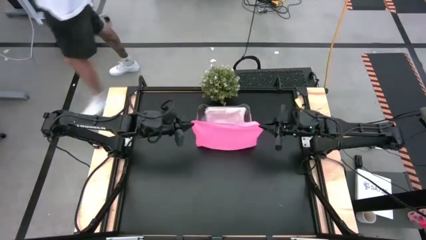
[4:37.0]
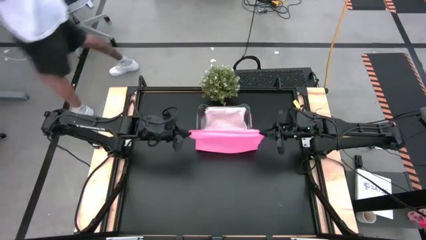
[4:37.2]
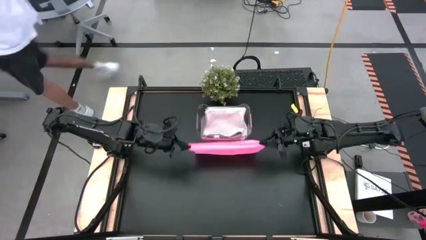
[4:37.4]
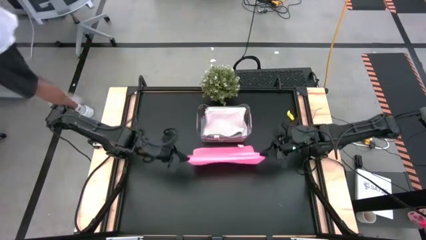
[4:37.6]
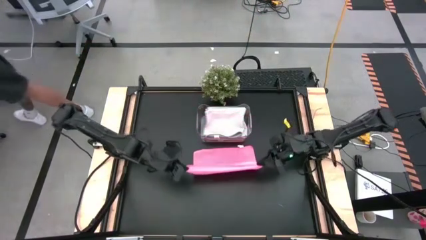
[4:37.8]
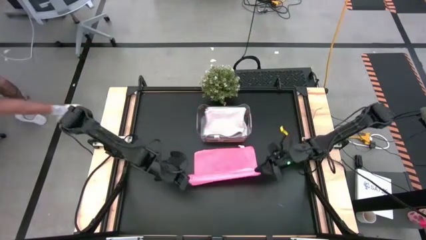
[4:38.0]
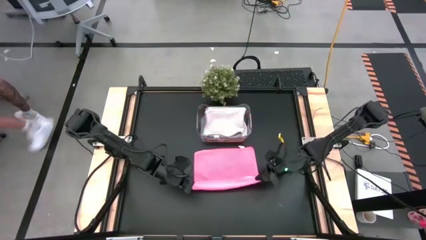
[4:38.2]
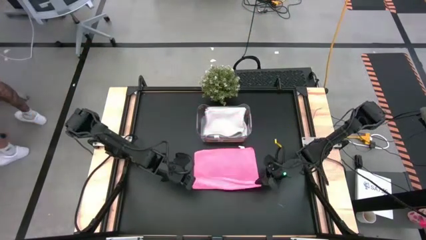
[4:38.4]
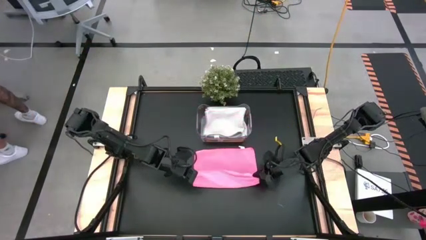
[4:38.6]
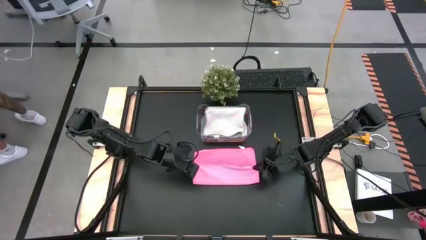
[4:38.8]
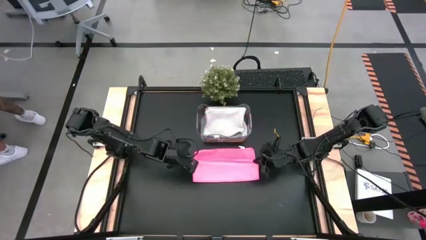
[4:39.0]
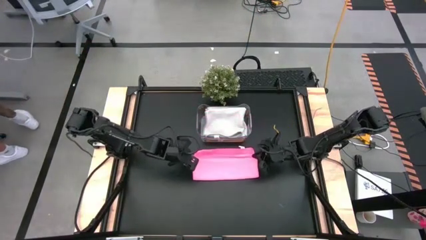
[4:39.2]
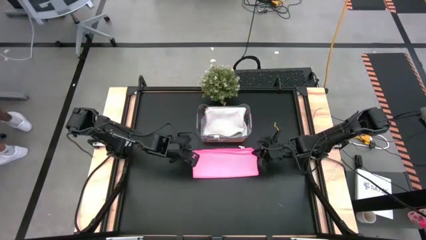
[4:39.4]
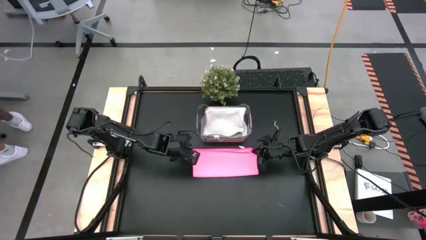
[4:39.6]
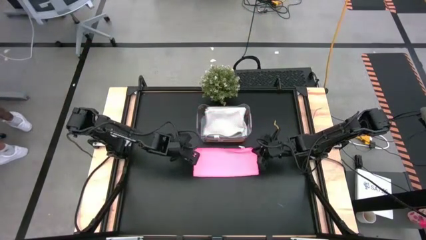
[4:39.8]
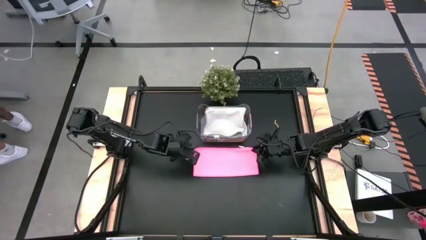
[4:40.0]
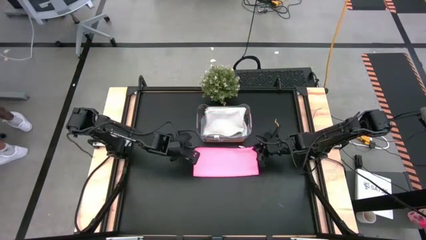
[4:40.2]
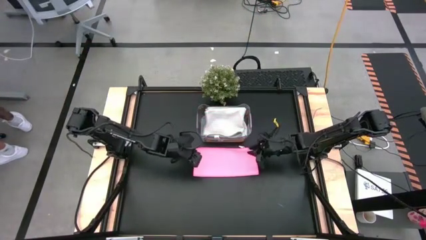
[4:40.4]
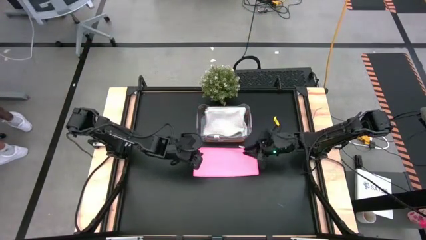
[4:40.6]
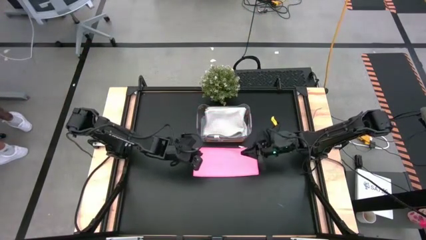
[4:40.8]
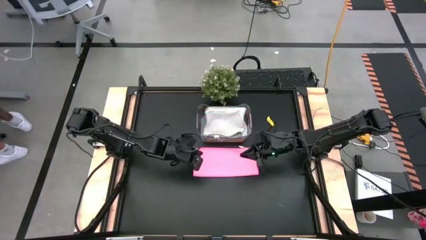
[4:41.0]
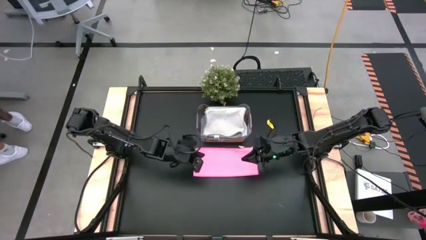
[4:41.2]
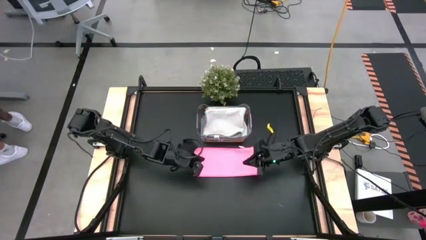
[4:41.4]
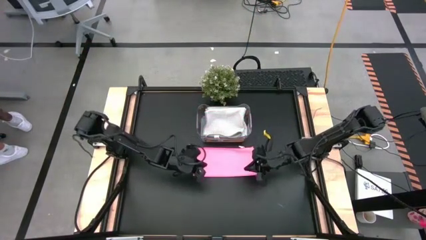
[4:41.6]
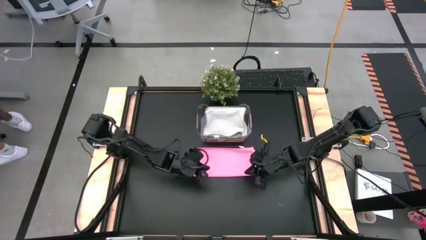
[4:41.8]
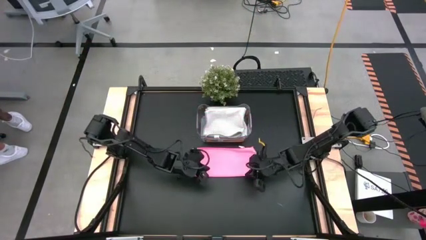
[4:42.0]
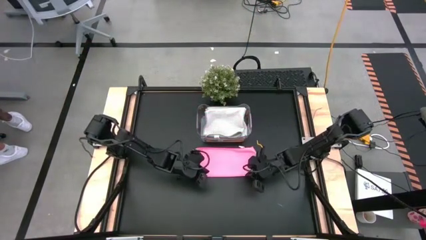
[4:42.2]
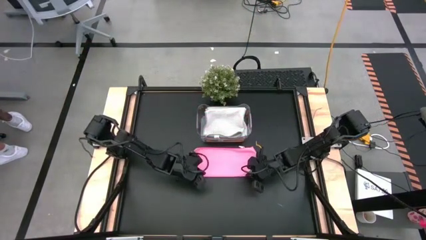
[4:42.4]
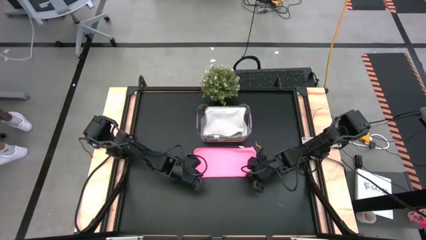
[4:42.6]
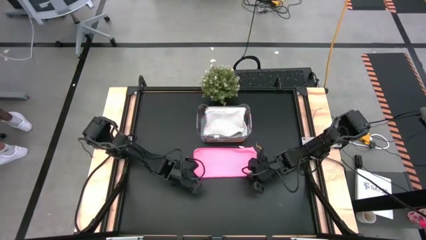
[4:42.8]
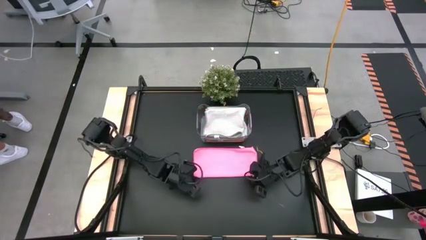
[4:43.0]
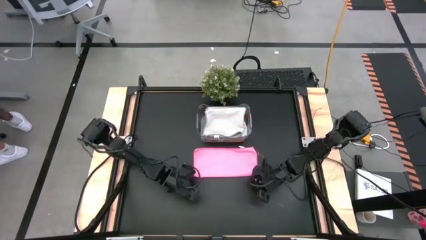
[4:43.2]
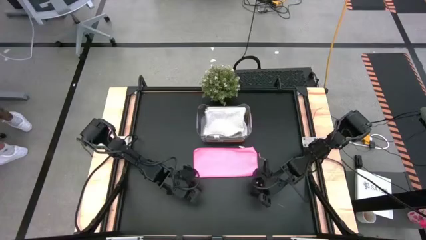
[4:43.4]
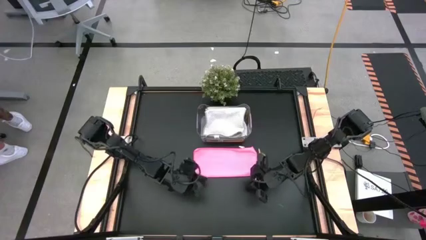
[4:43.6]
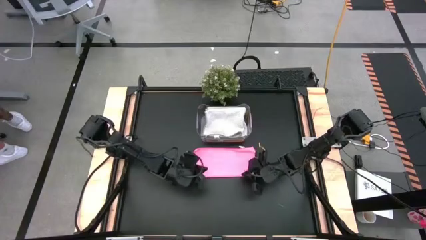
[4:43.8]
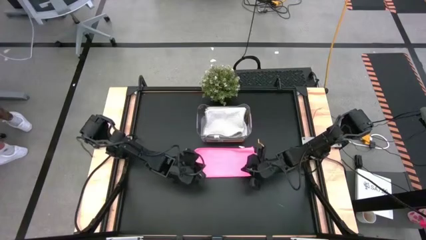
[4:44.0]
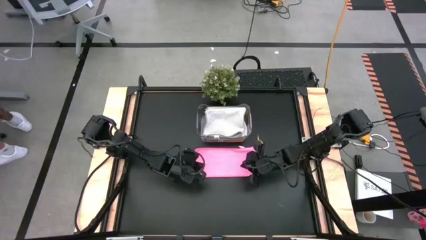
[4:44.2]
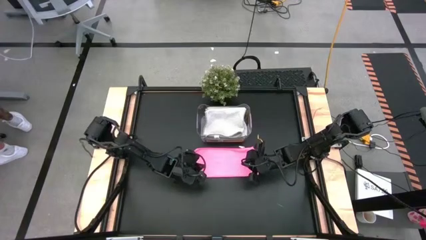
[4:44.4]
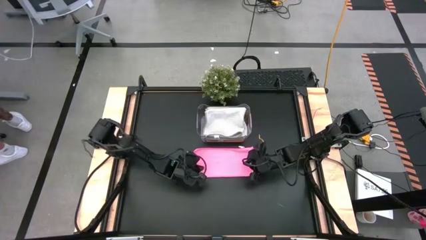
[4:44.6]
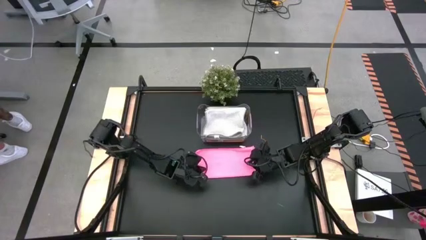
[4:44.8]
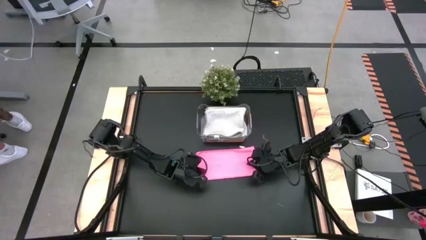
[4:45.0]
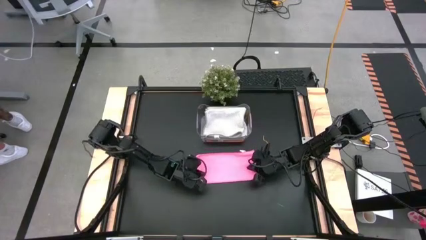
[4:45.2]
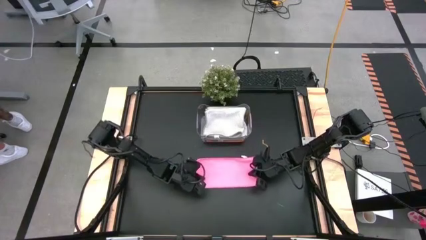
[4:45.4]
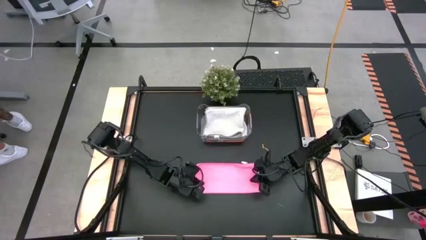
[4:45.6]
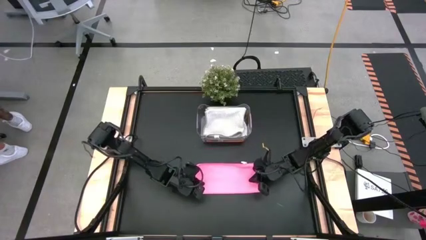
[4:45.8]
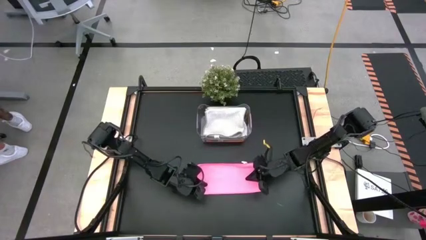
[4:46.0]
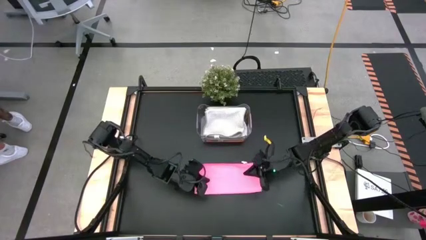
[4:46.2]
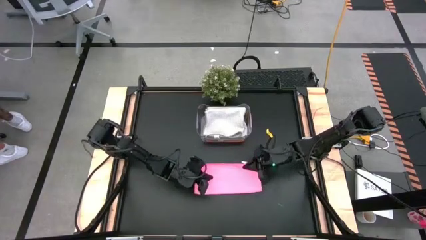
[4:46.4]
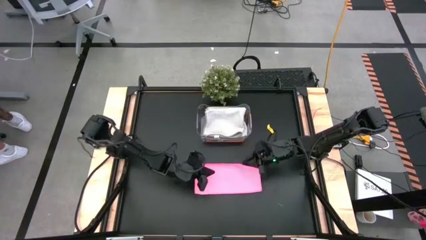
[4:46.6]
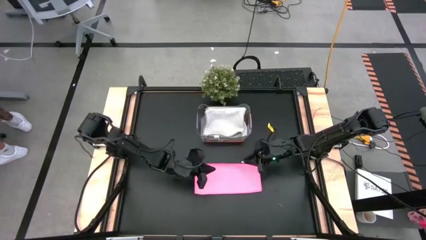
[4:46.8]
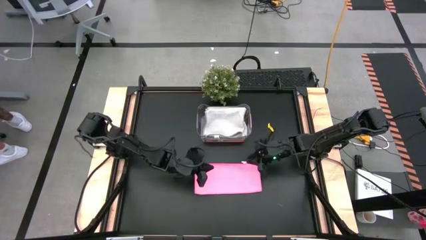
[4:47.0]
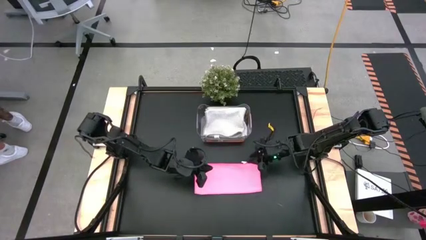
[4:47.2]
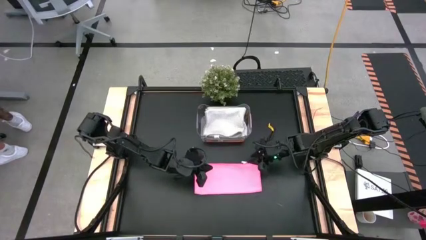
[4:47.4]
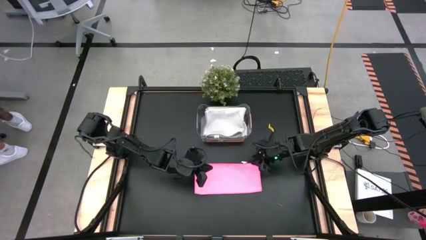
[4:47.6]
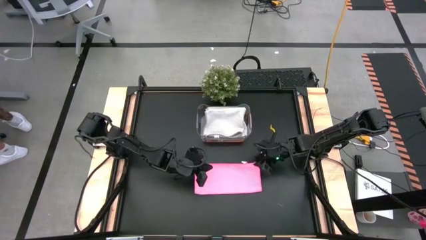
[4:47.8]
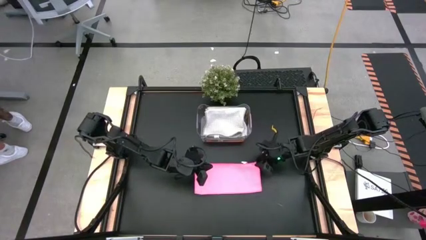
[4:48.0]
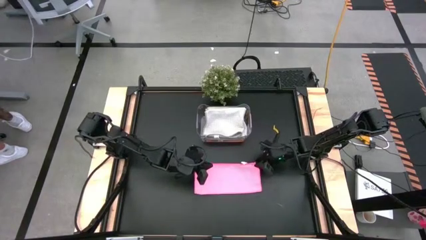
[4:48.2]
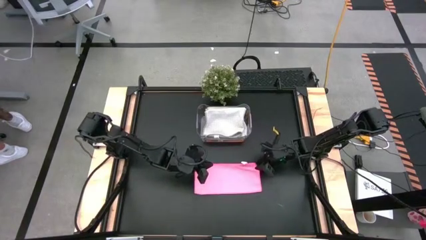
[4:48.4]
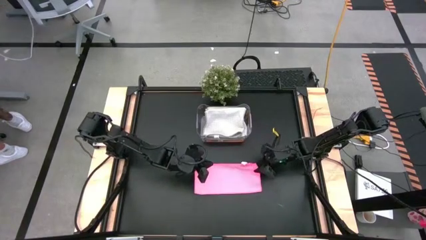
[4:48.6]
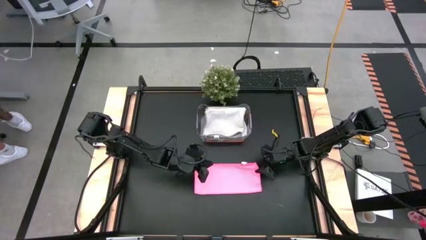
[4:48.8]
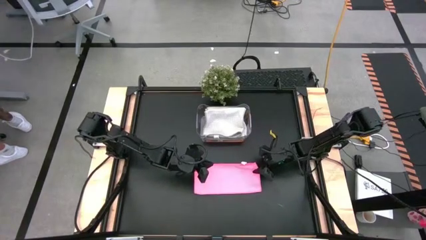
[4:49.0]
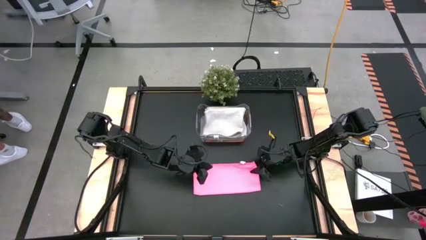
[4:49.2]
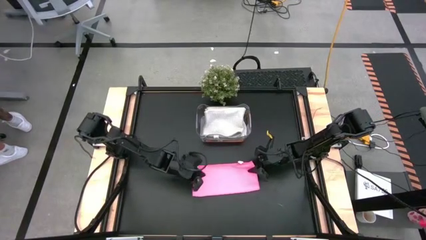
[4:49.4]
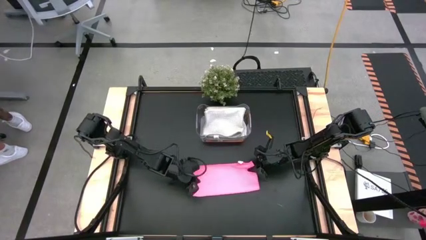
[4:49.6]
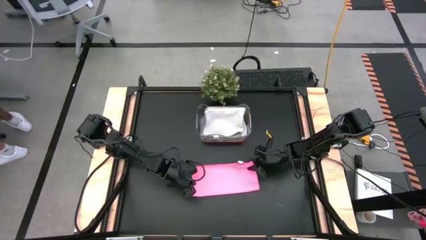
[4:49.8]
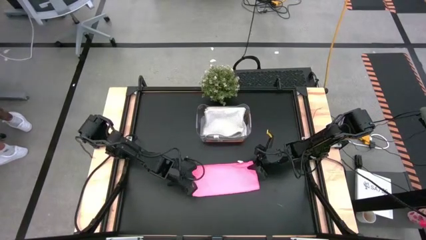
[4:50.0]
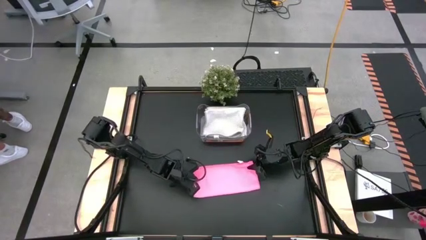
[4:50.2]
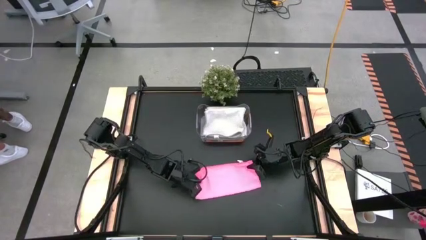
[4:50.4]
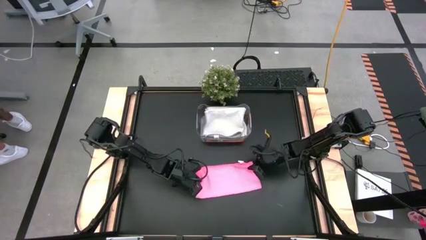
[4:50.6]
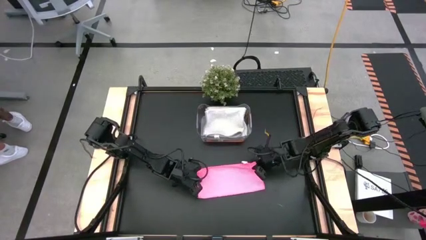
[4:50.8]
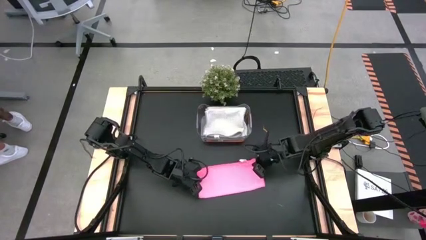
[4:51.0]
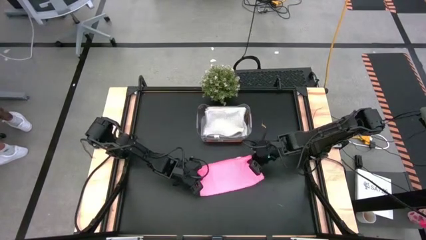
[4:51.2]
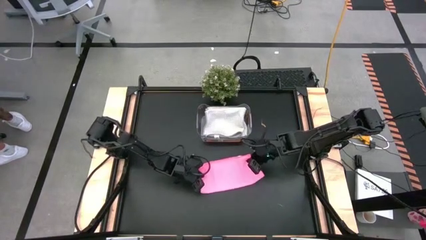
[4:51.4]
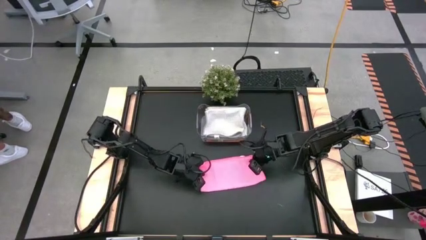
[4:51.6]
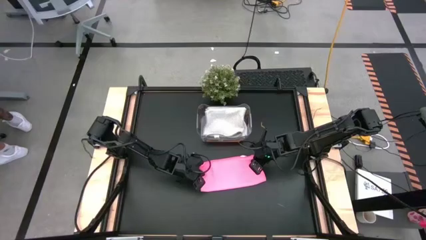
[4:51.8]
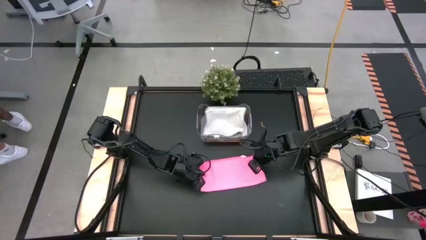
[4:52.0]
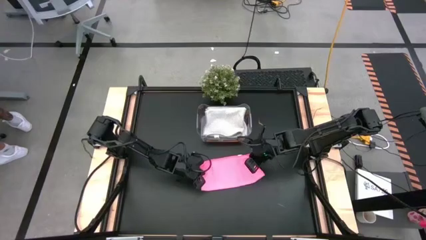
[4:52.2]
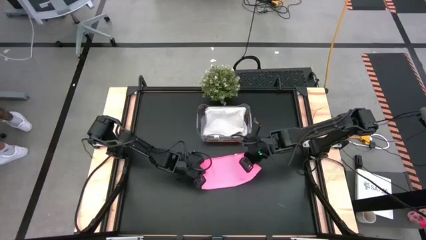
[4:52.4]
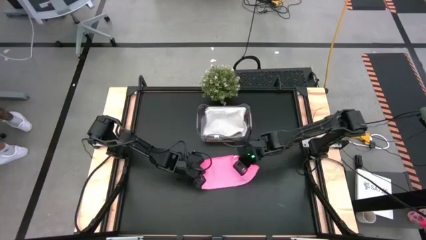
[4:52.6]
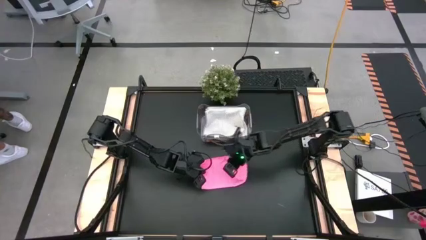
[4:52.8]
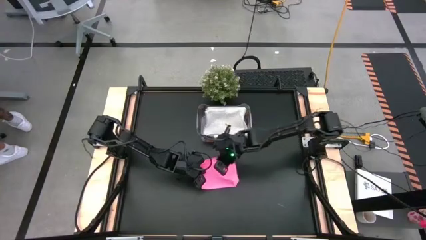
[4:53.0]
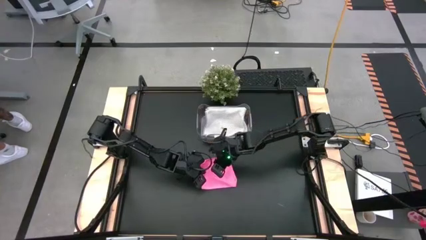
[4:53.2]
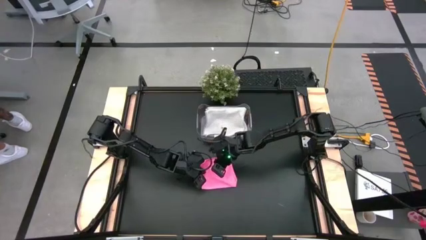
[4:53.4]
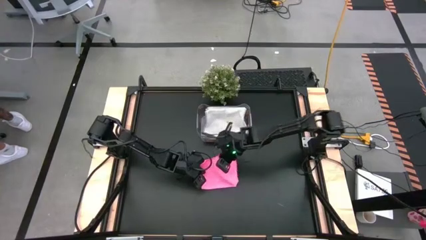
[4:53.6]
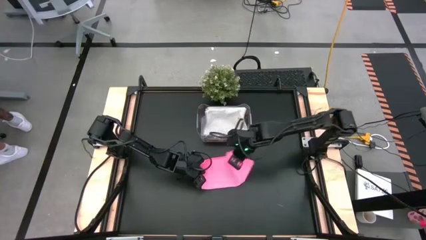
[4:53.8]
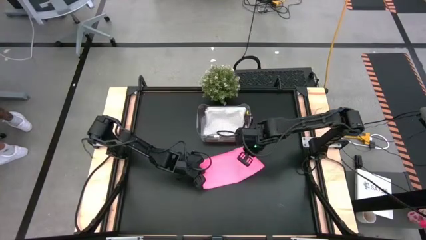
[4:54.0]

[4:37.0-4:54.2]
Task: Fold microfiber towels
Fold the pink microfiber towel
